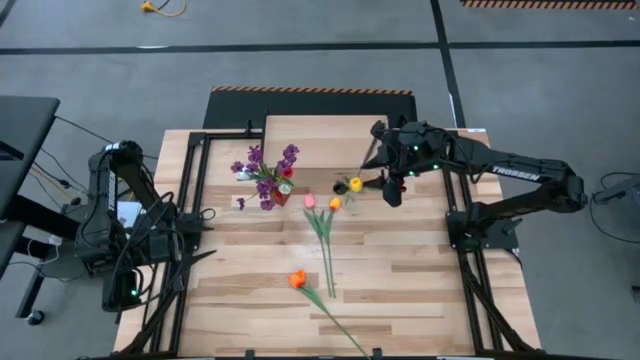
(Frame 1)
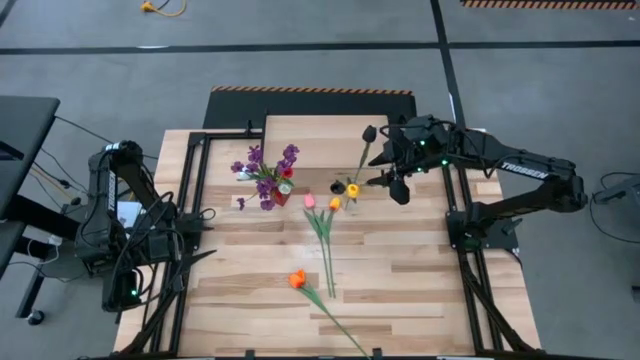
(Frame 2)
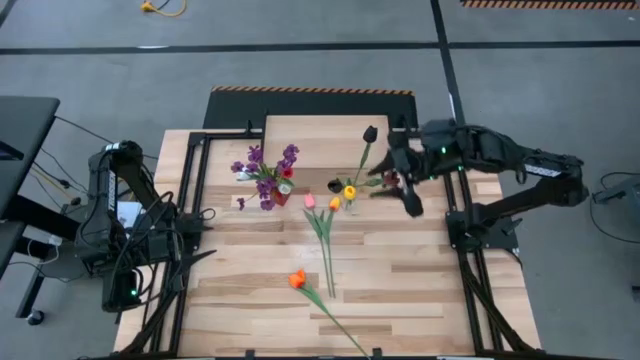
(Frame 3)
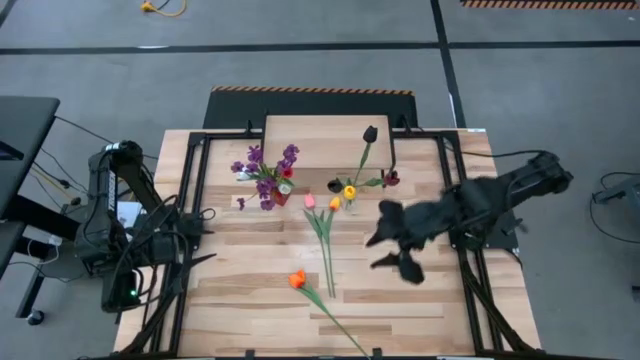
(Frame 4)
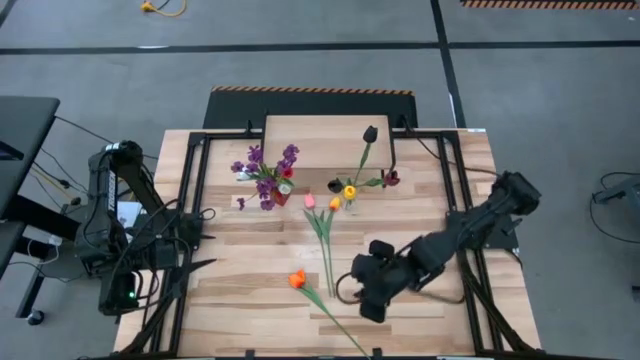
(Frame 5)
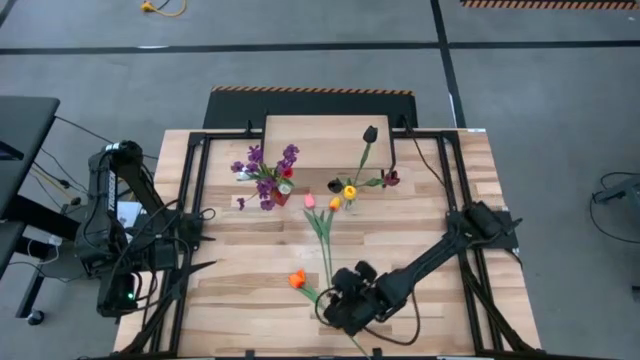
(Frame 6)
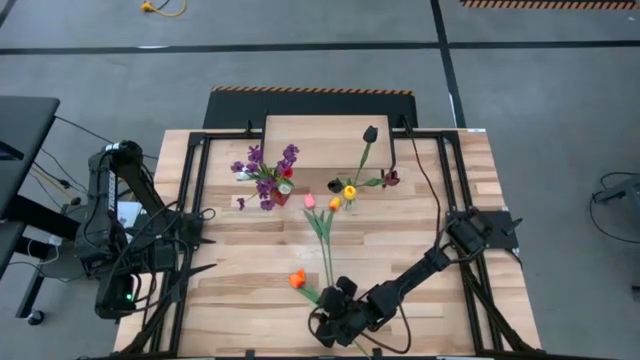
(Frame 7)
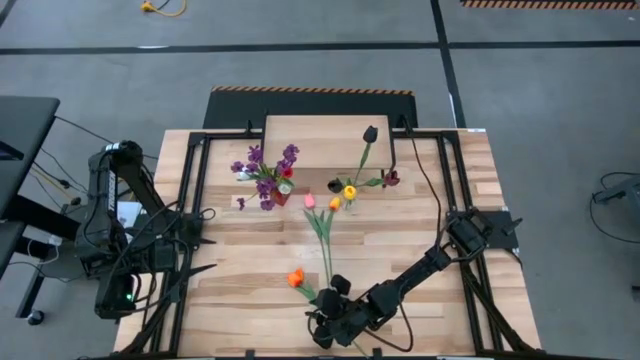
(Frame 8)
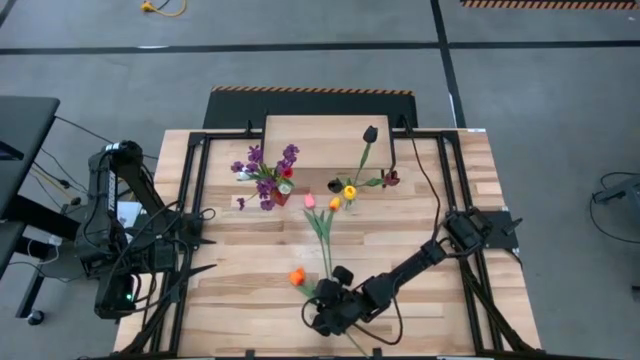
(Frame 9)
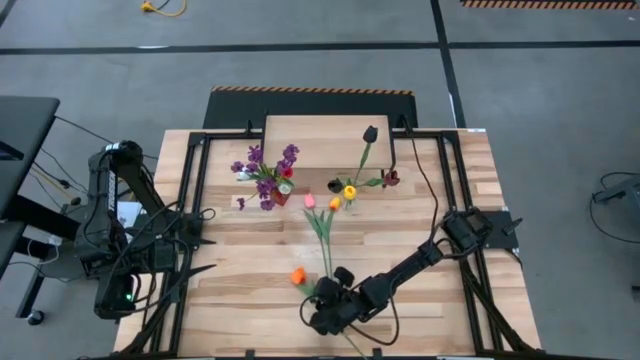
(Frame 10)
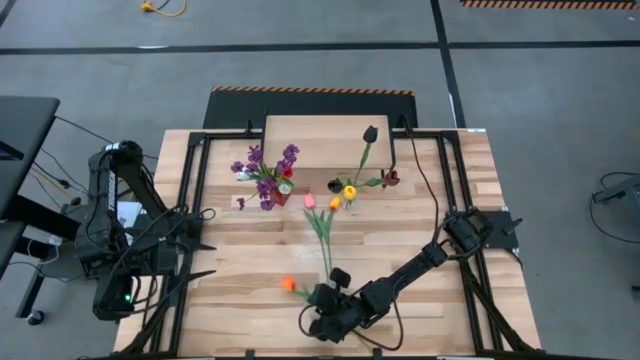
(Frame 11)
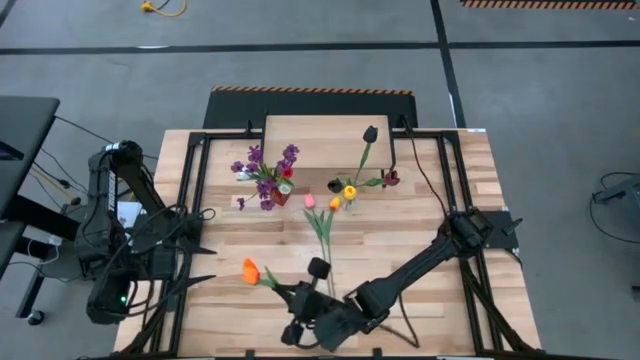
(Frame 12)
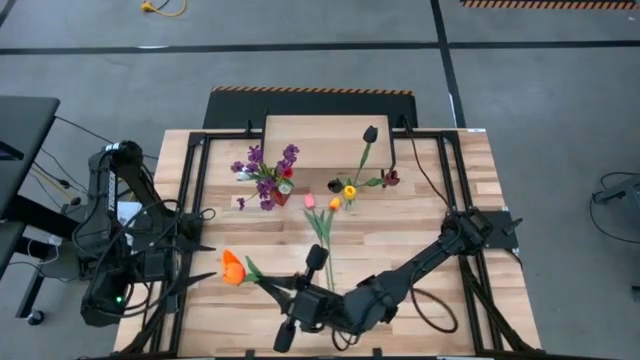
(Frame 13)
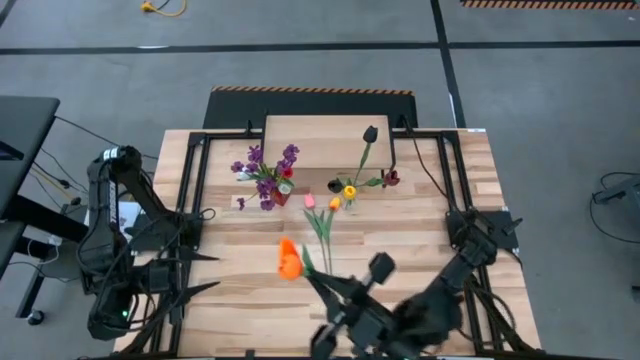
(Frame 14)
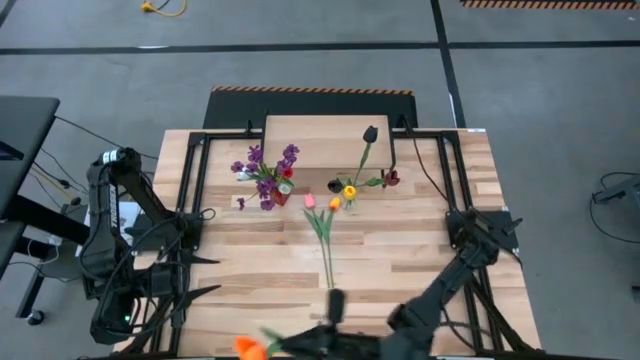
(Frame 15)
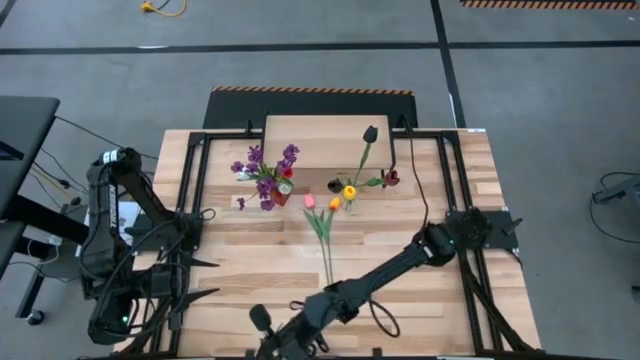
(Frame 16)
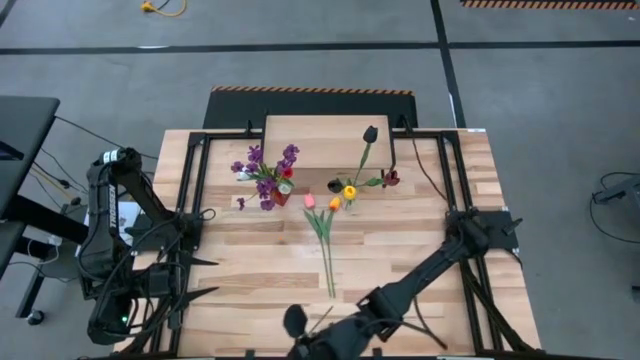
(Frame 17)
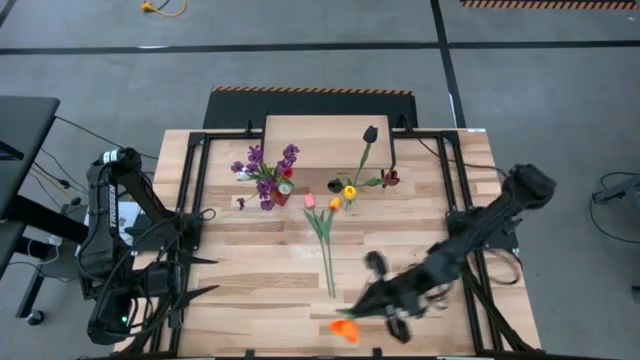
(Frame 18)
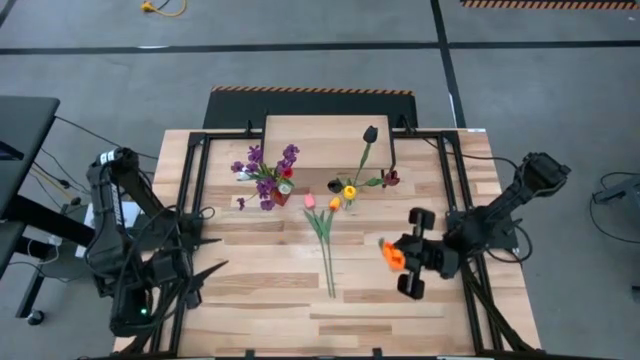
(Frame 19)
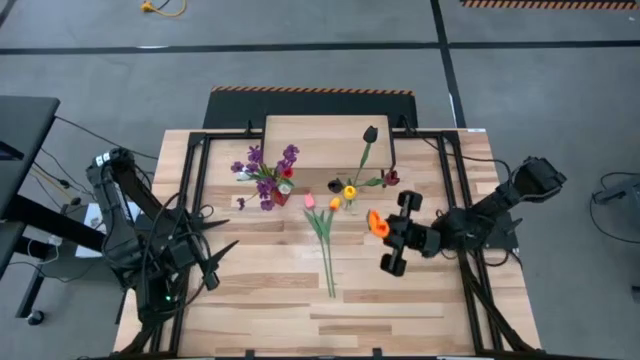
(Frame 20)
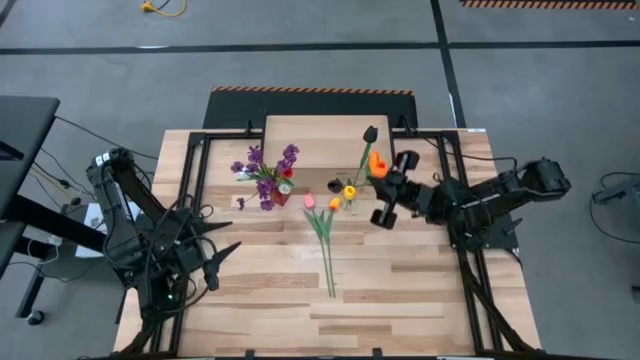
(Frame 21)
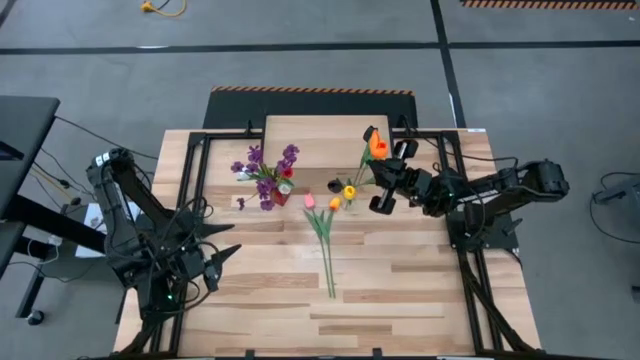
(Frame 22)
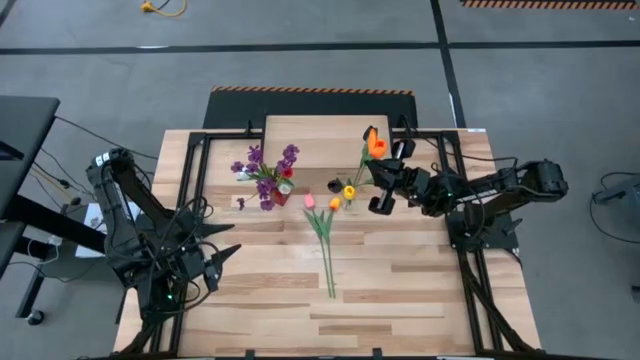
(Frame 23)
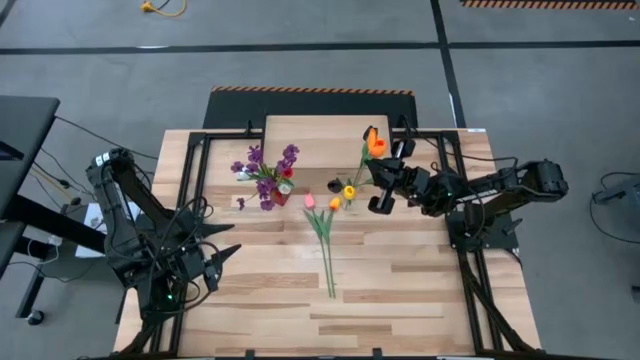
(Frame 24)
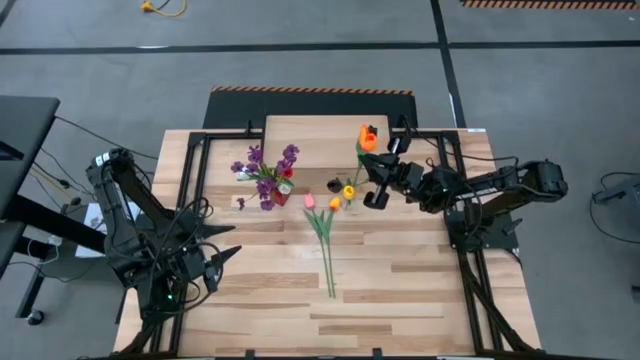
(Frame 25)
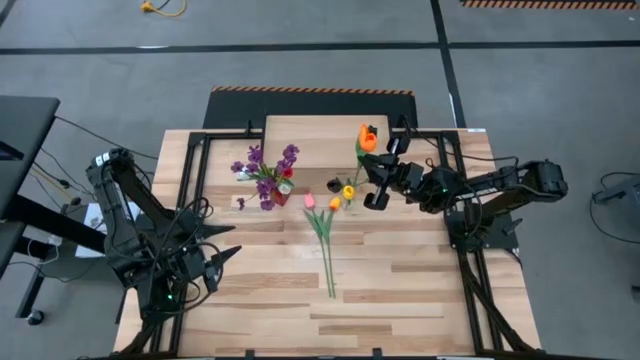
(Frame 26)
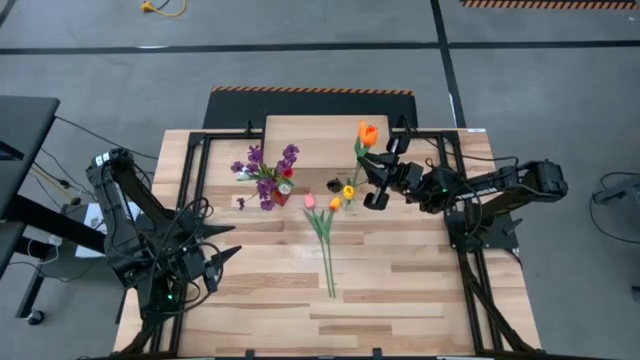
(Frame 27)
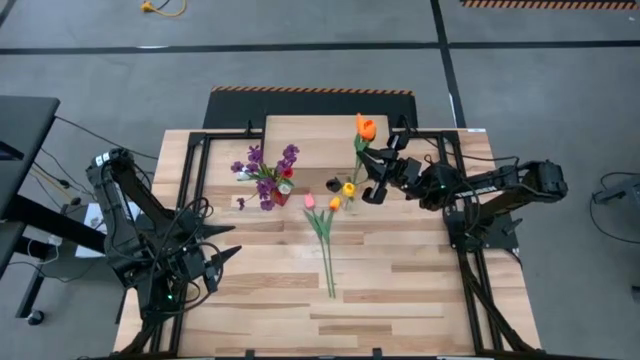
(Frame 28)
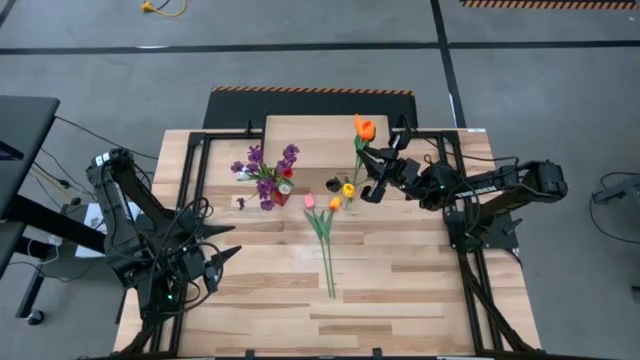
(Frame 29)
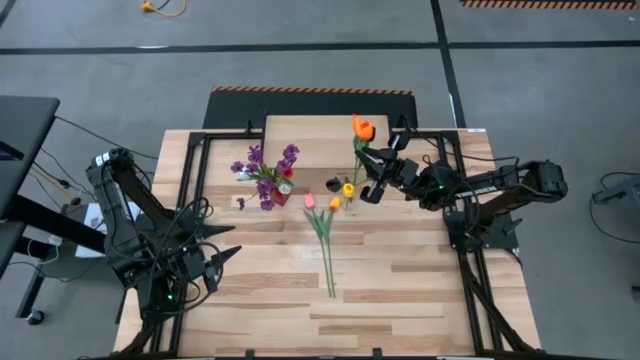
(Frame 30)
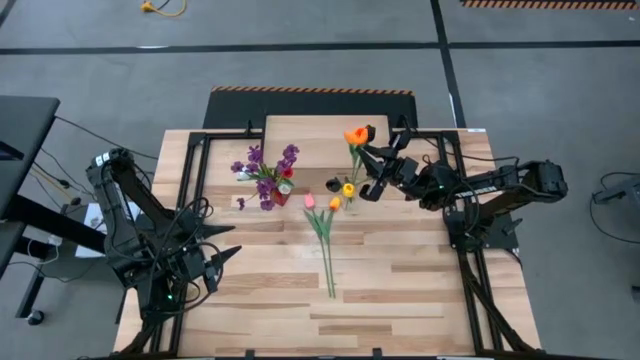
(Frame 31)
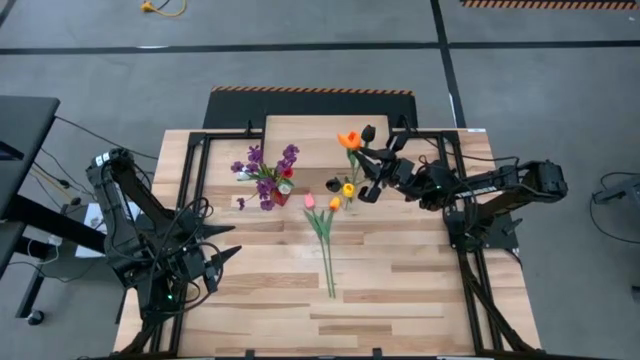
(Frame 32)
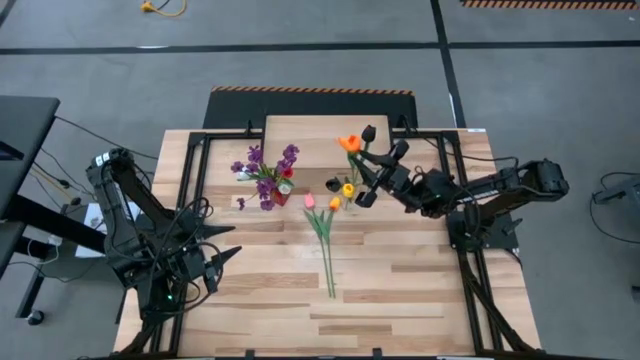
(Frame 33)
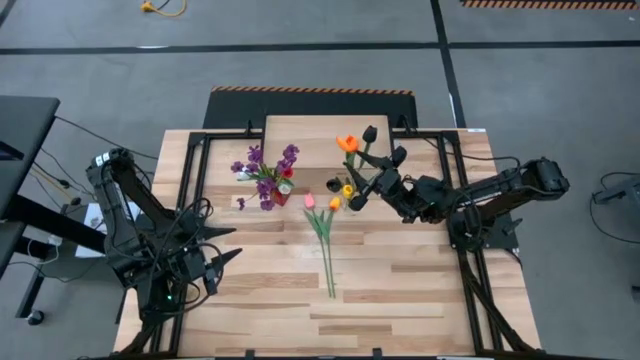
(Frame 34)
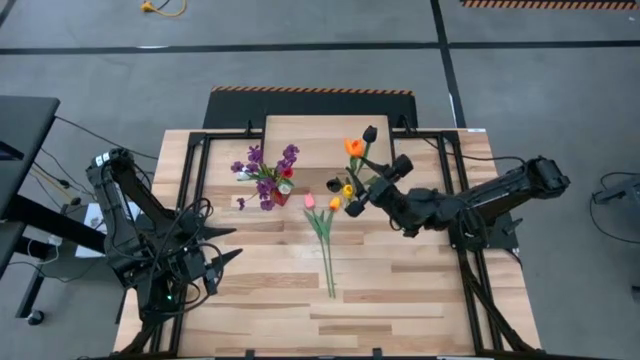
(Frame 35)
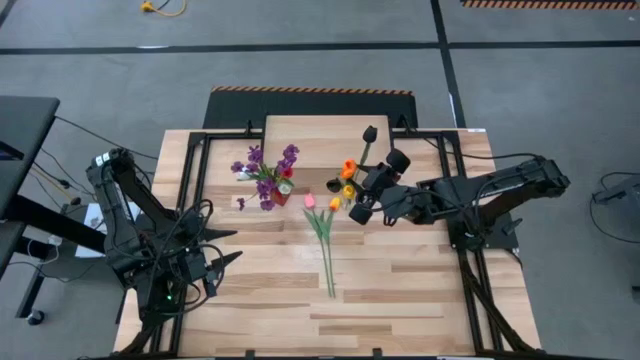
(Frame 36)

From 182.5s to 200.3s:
Task: Pick and place flowers into a vace then onto a shelf
Put the bottom orange flower into the transparent flower vase

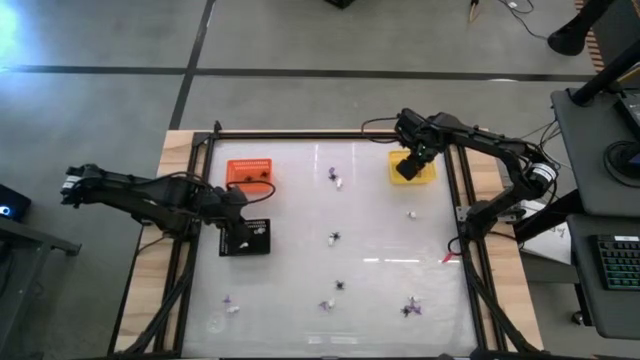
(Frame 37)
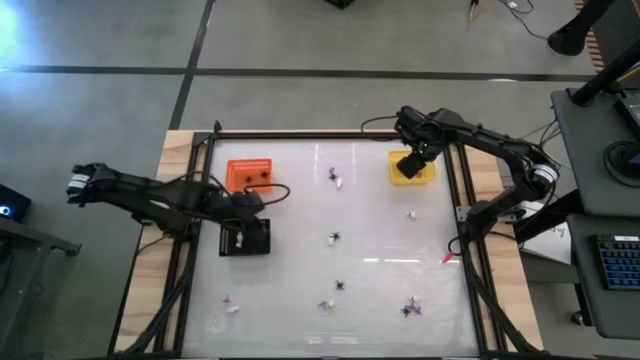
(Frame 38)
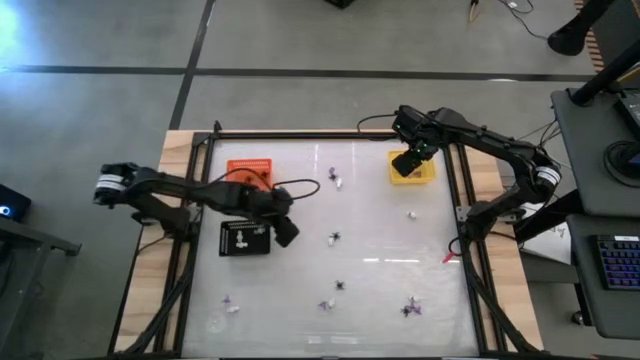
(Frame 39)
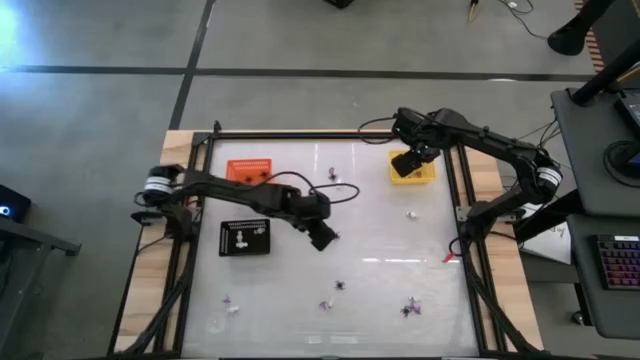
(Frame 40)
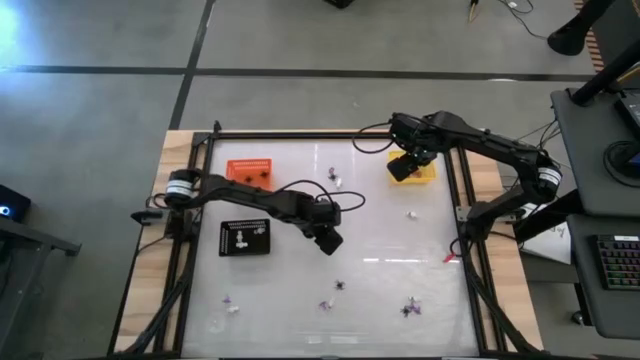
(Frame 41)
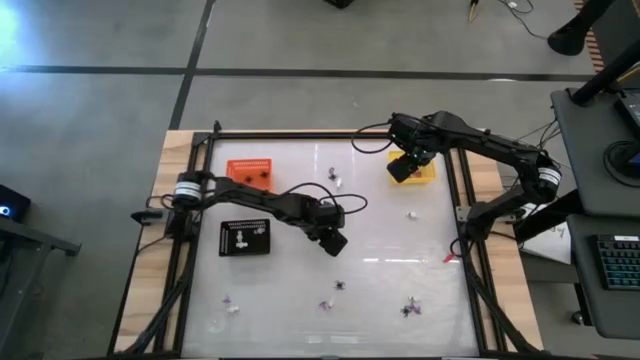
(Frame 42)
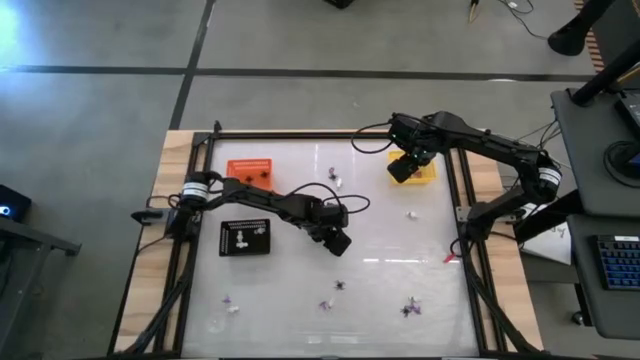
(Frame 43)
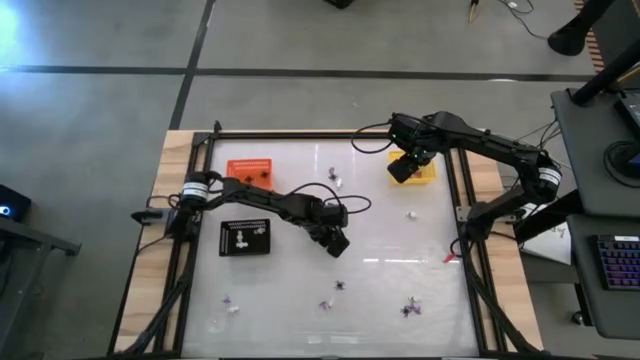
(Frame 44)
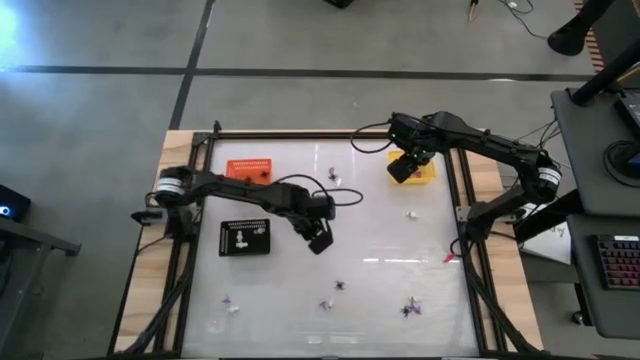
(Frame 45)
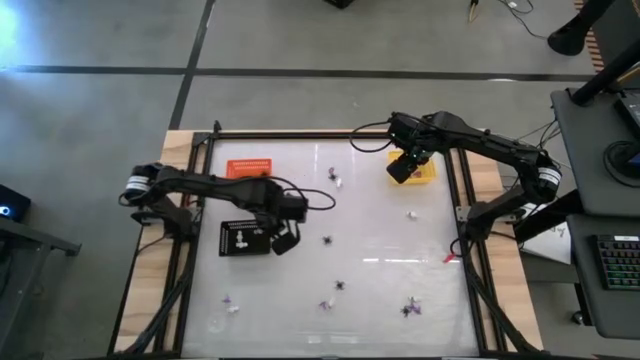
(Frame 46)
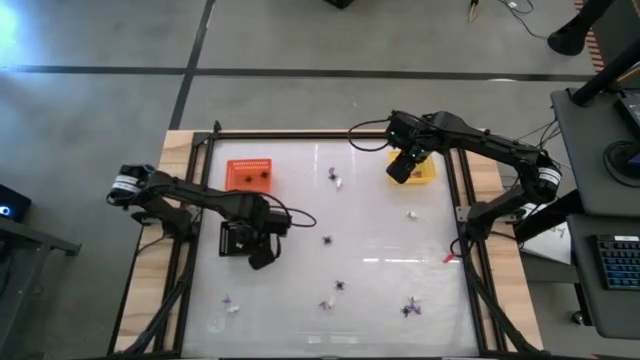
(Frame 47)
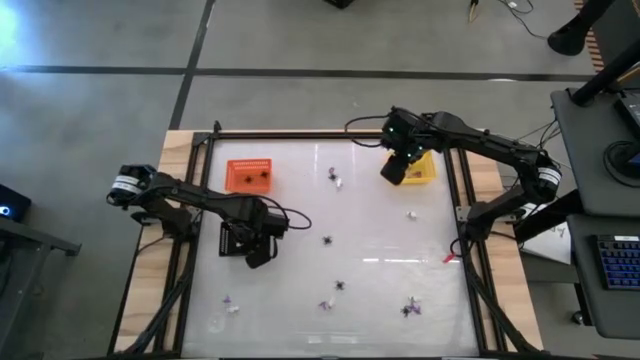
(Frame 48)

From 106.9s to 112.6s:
Task: Sort Halloween decoration
Put the white skeleton toy into the black bin
